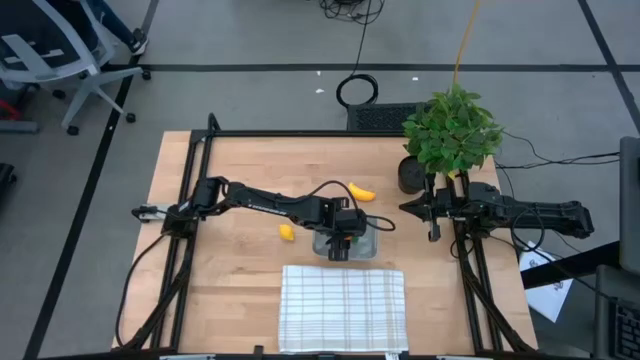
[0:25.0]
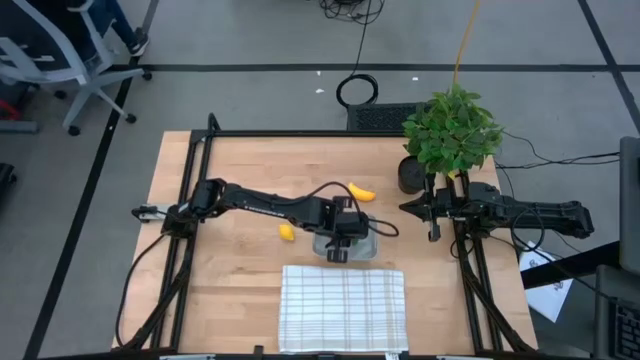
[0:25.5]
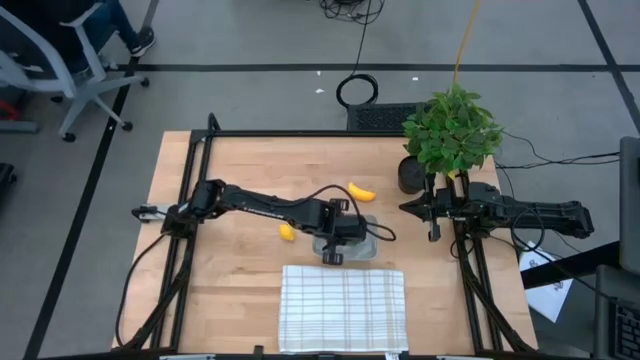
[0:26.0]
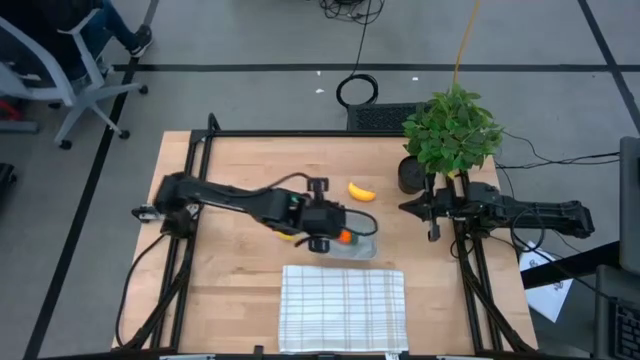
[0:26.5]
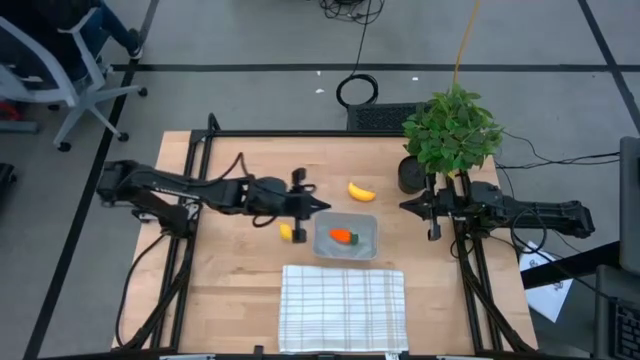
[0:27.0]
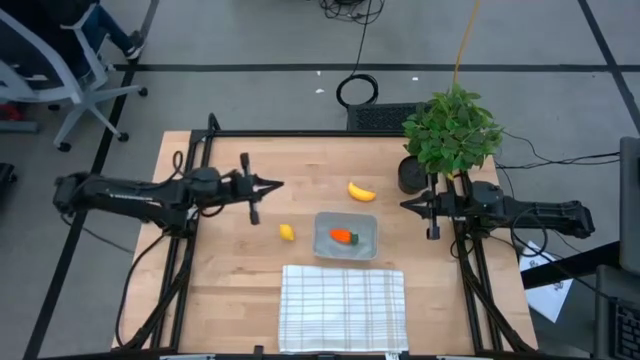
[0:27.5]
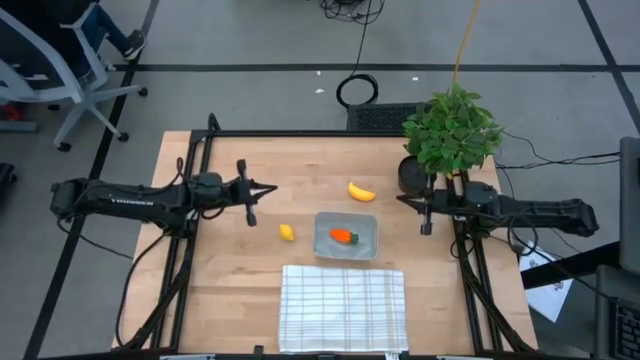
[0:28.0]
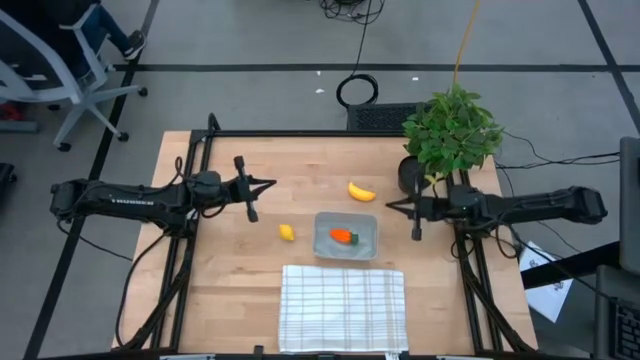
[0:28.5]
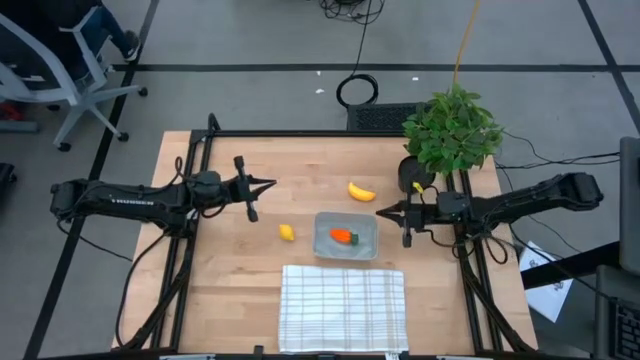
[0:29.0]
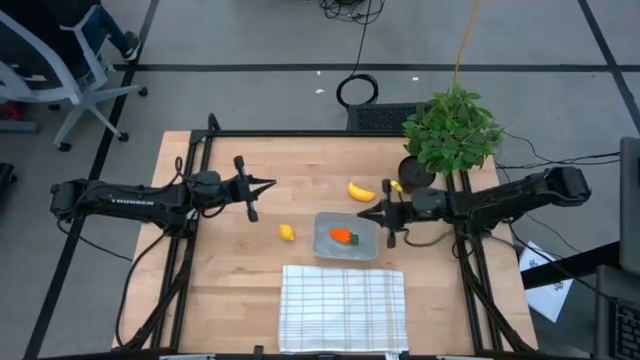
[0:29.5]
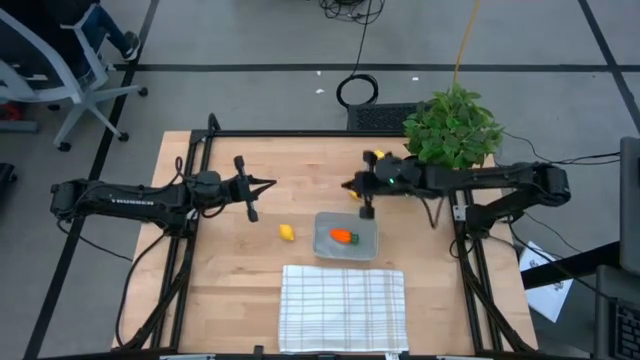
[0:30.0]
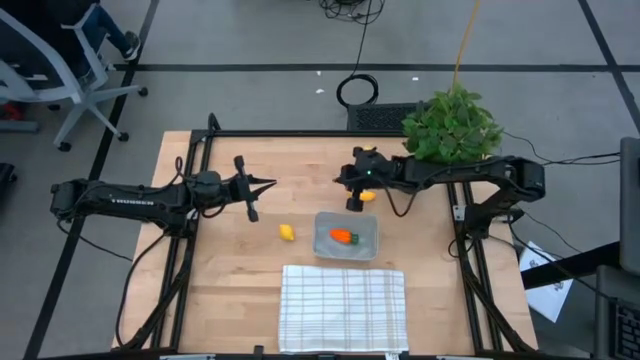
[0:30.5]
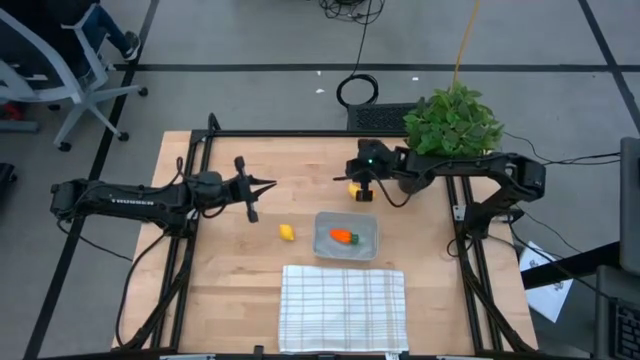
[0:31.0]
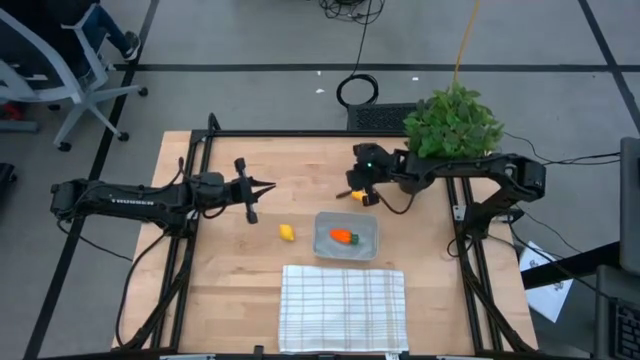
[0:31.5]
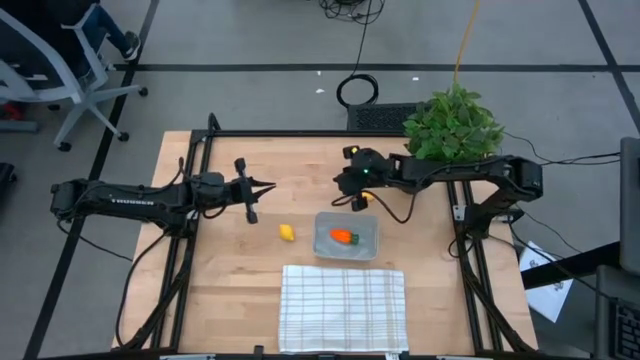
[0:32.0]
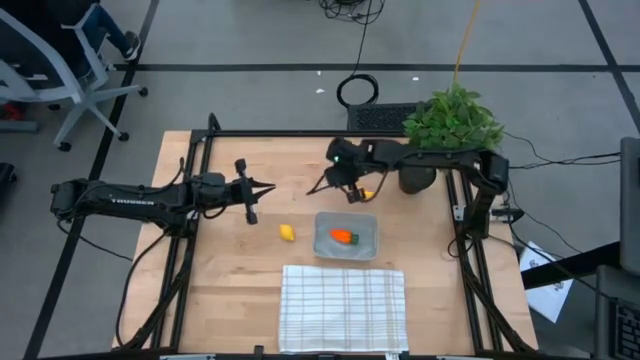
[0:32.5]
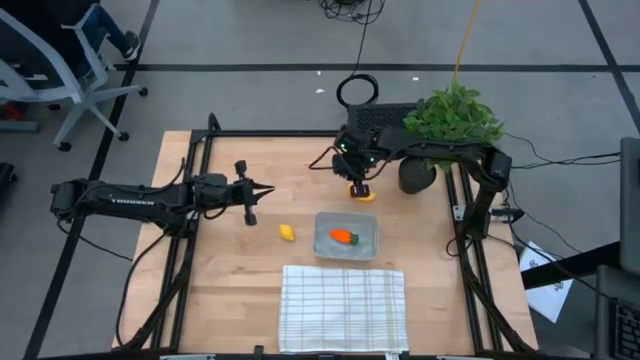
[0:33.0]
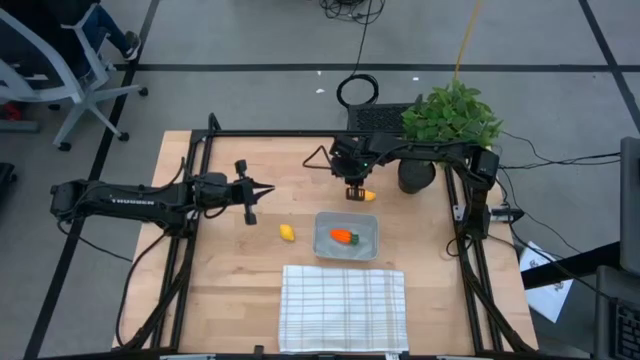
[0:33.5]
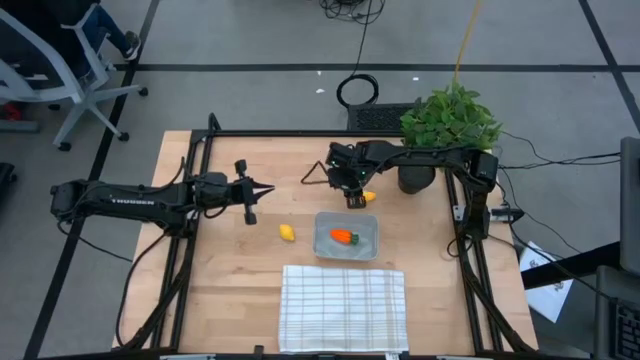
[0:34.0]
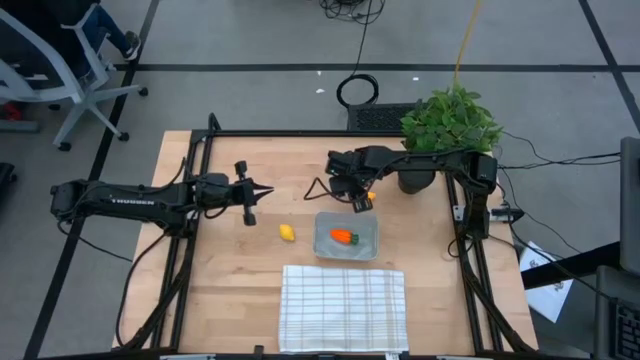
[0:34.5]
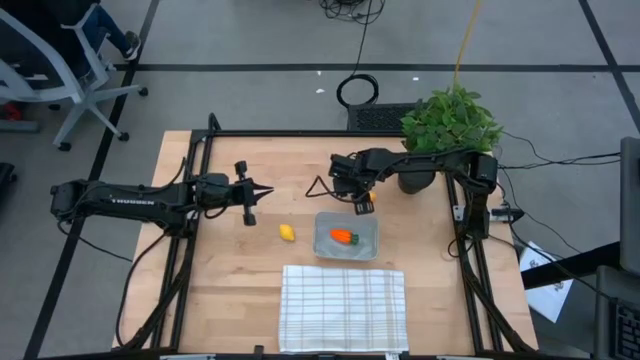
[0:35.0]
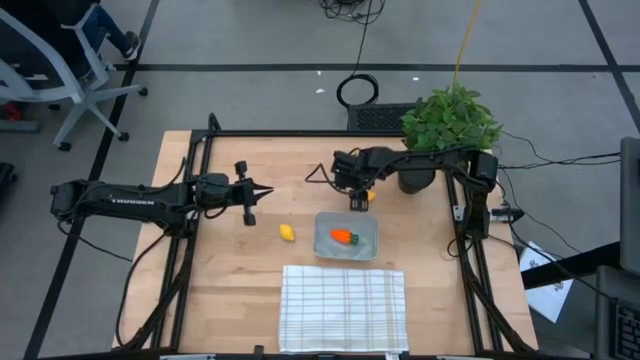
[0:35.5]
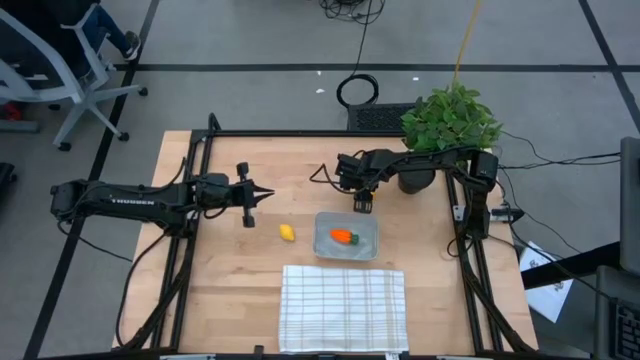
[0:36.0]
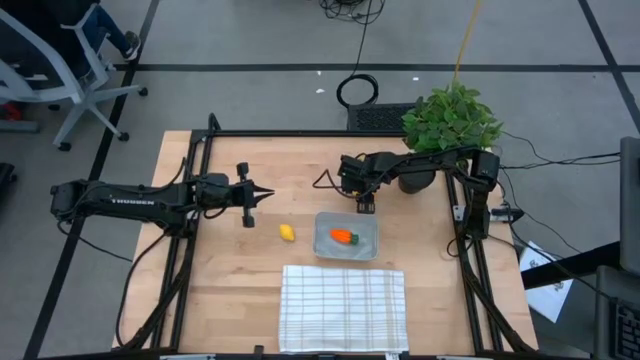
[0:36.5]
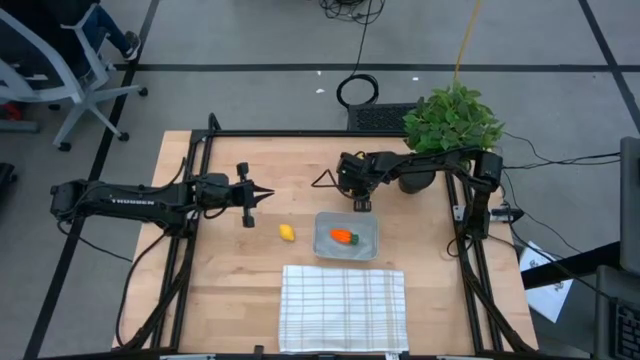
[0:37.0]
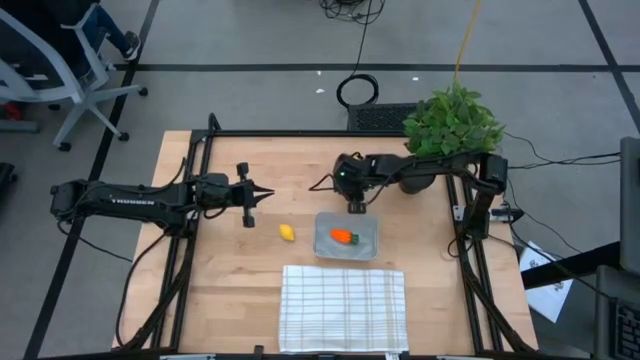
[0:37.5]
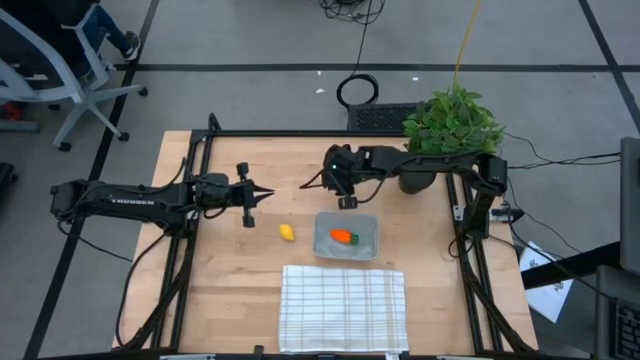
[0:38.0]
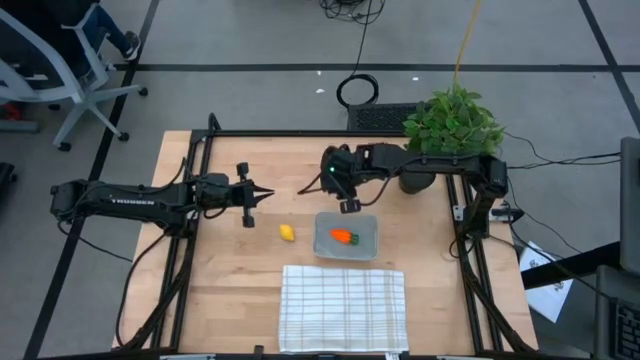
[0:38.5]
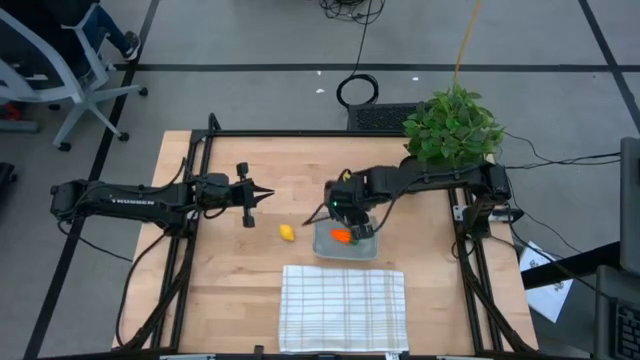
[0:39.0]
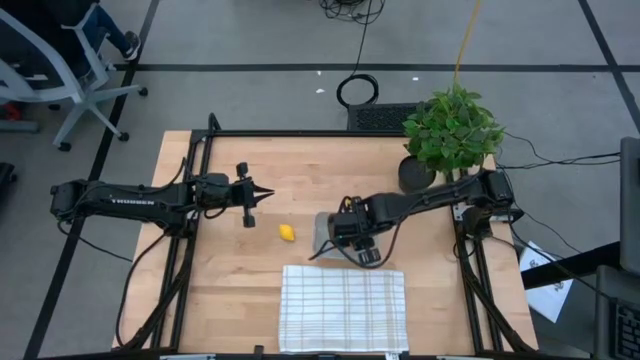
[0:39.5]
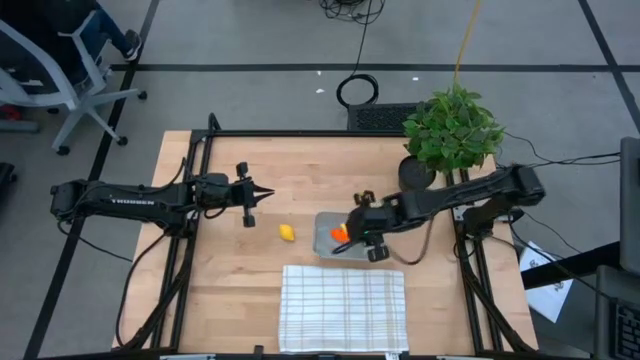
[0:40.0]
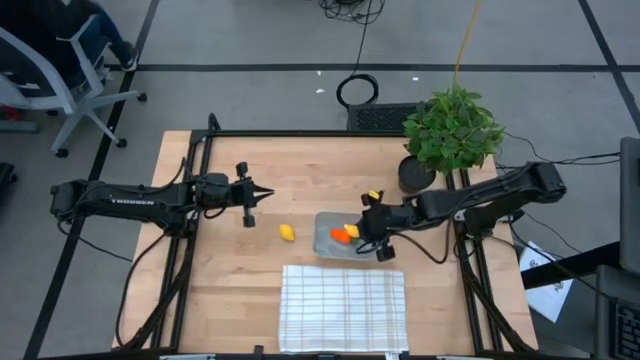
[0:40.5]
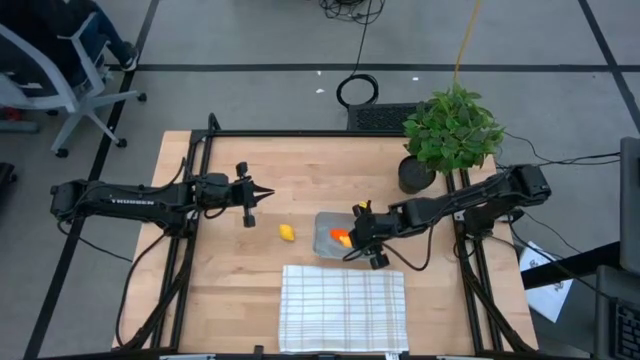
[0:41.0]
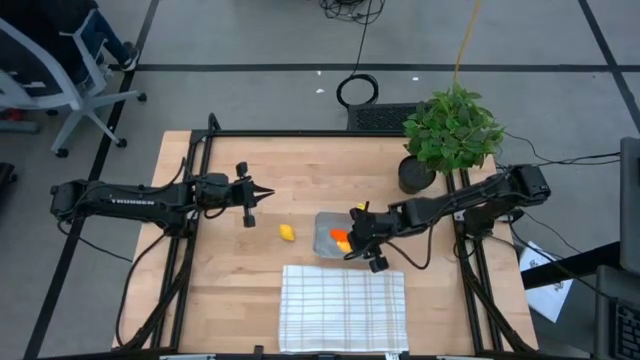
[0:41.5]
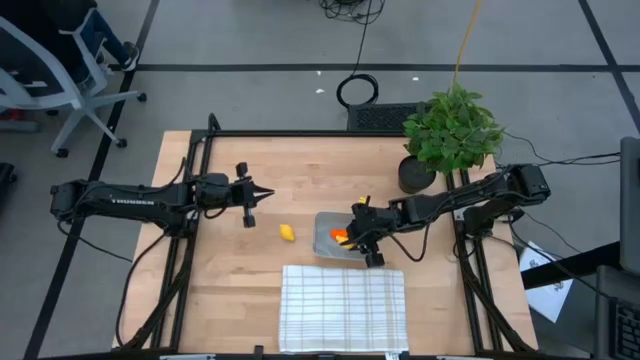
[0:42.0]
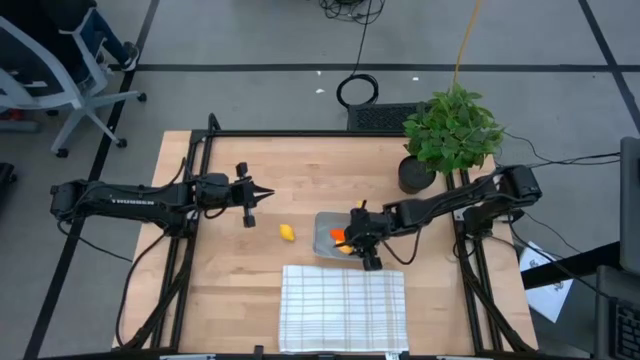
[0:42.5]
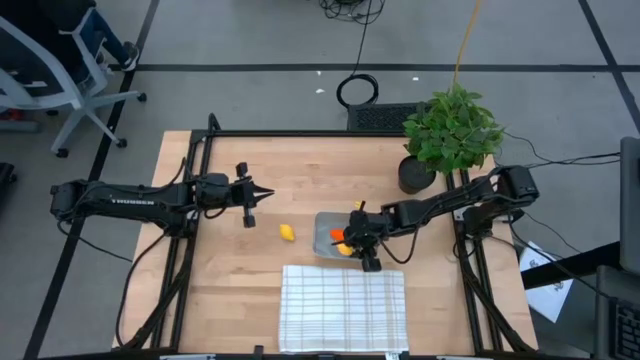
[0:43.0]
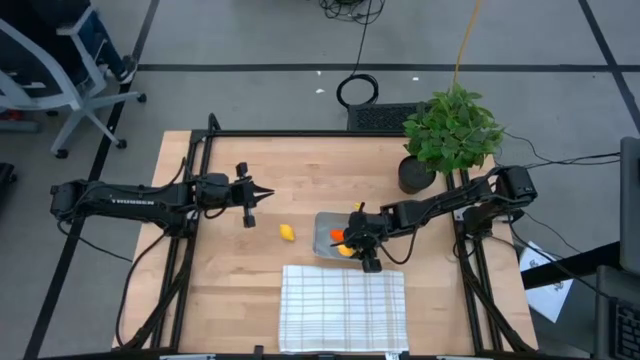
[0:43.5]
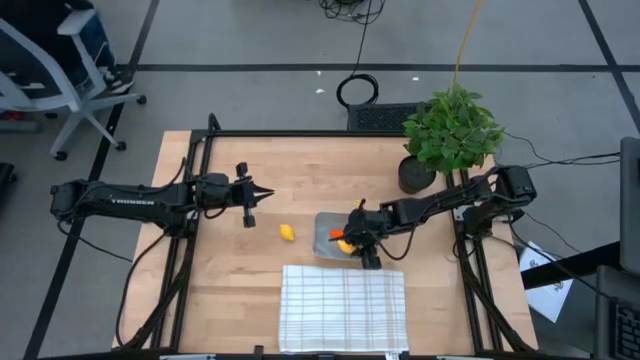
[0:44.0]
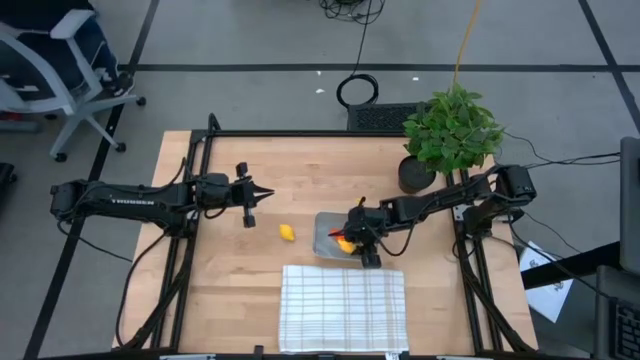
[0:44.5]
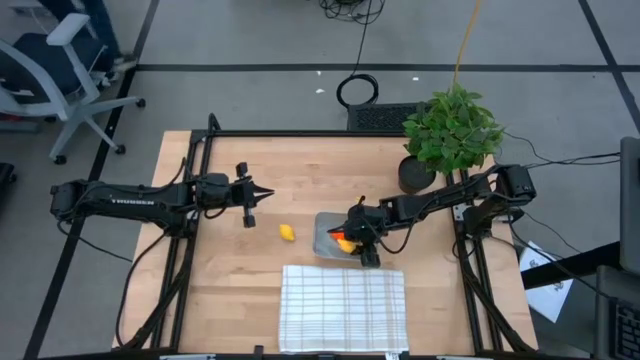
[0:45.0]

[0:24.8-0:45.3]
Task: Pick and placing Produce into tupperware
Put the banana into the bin
